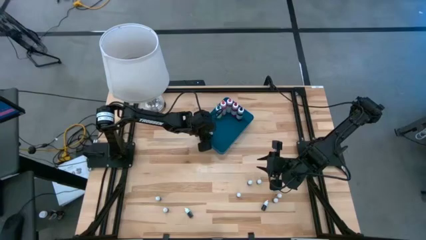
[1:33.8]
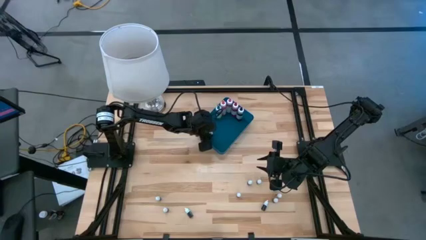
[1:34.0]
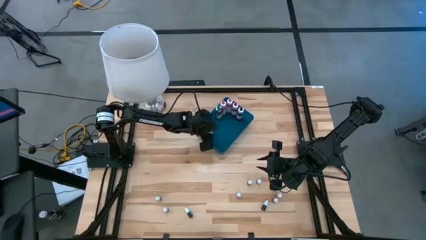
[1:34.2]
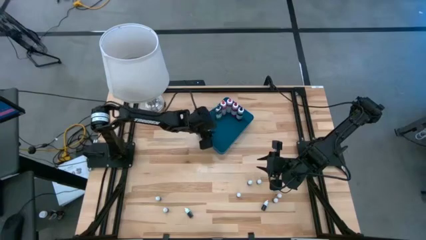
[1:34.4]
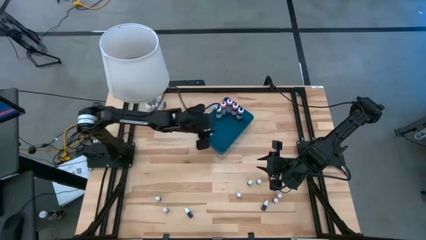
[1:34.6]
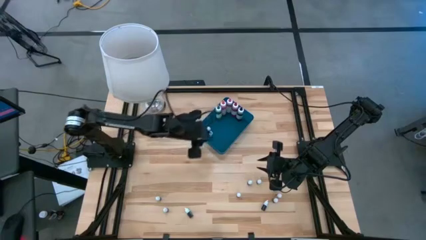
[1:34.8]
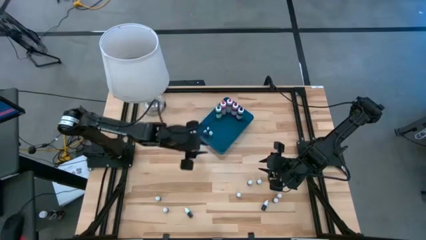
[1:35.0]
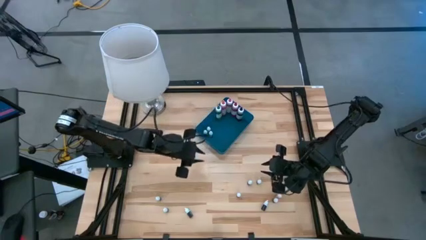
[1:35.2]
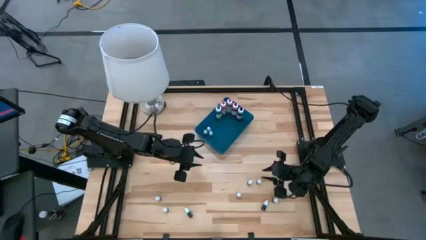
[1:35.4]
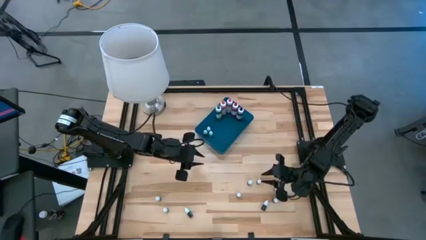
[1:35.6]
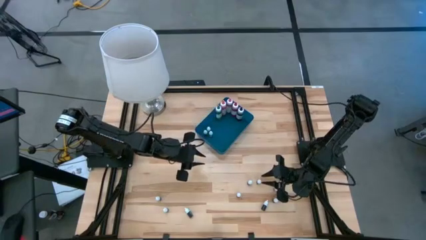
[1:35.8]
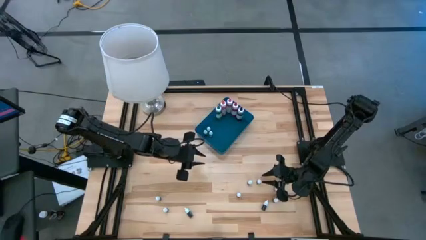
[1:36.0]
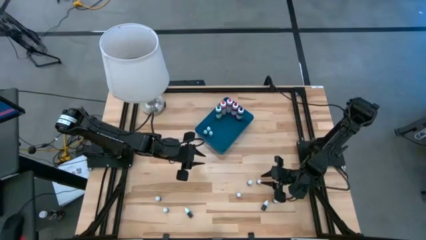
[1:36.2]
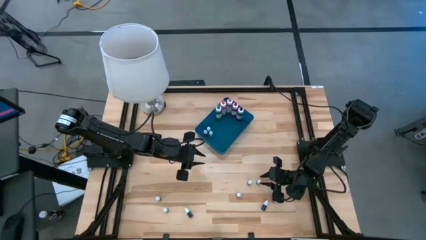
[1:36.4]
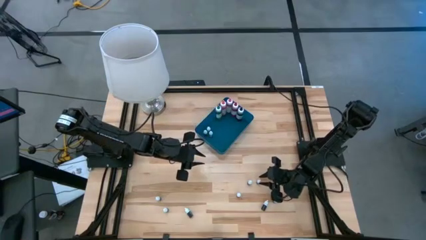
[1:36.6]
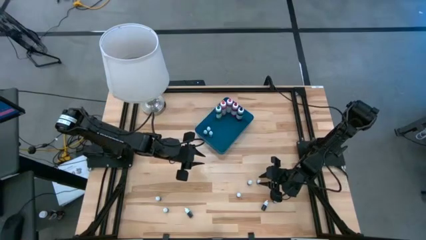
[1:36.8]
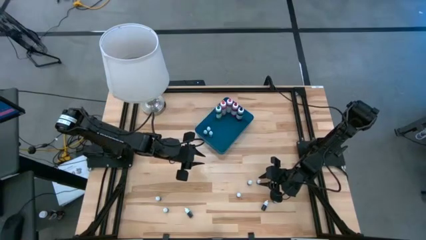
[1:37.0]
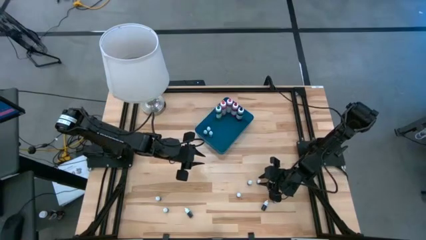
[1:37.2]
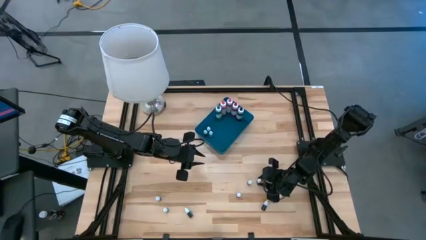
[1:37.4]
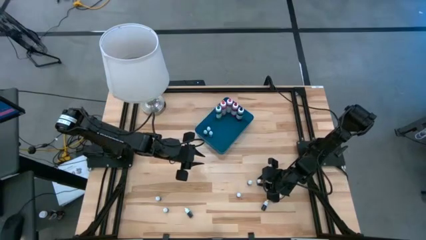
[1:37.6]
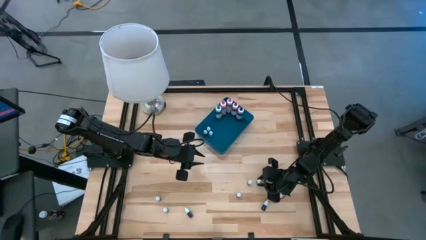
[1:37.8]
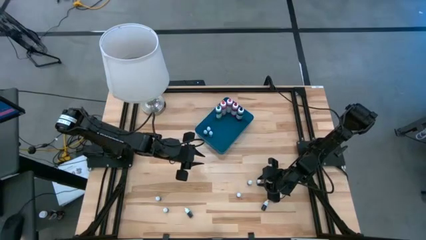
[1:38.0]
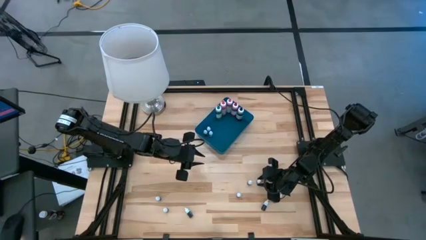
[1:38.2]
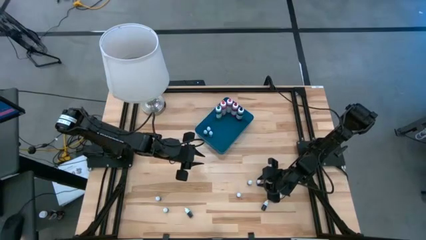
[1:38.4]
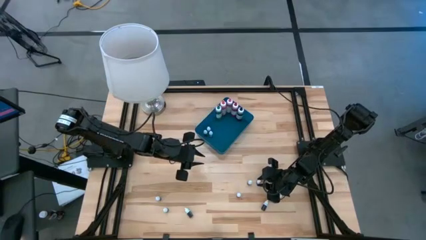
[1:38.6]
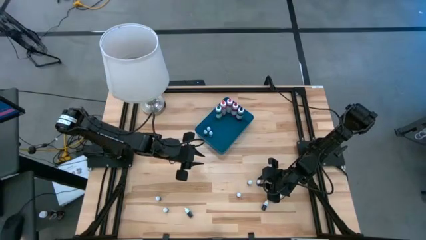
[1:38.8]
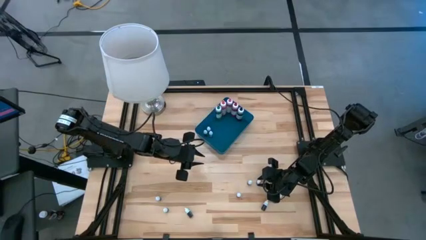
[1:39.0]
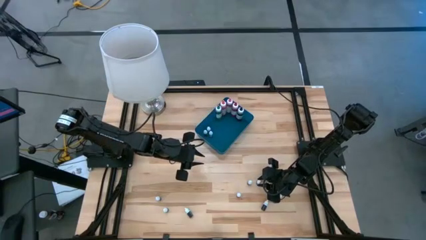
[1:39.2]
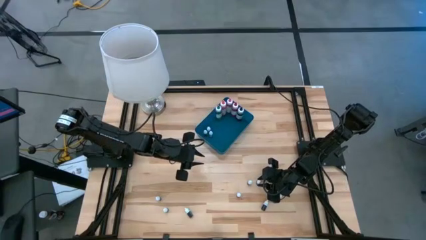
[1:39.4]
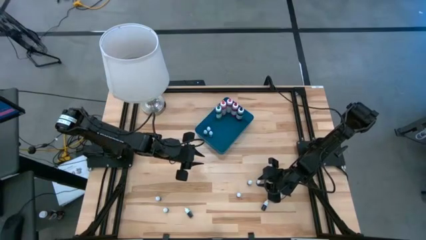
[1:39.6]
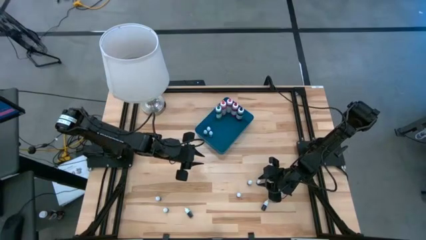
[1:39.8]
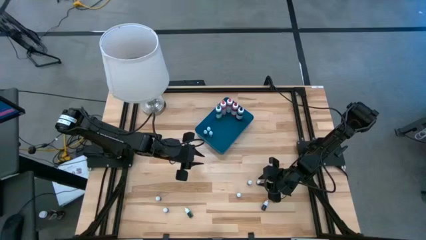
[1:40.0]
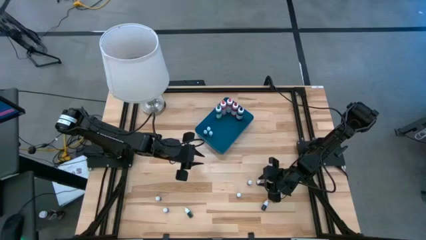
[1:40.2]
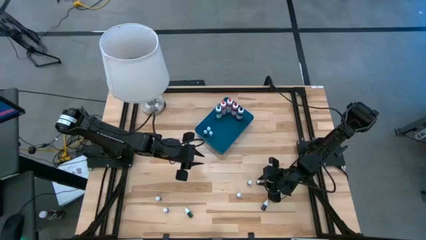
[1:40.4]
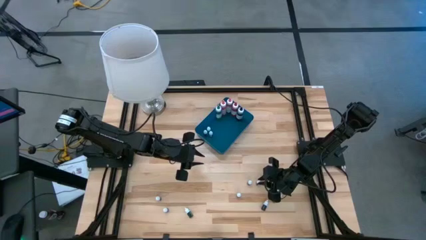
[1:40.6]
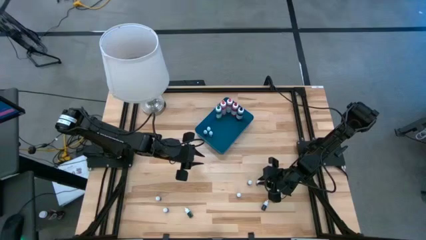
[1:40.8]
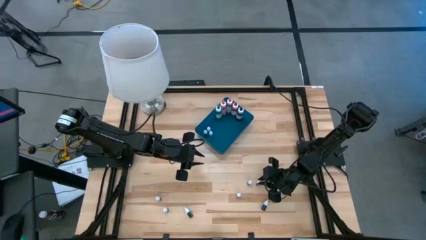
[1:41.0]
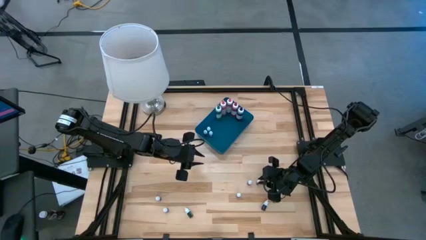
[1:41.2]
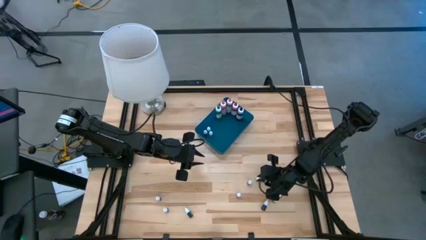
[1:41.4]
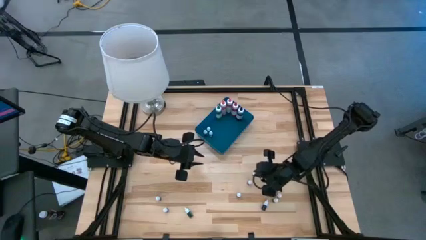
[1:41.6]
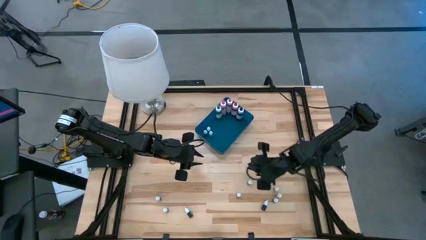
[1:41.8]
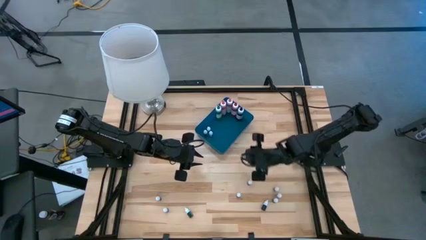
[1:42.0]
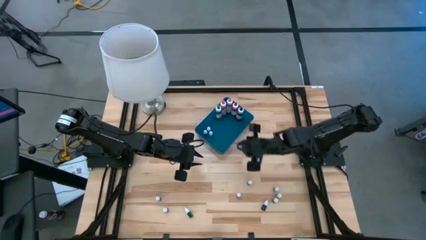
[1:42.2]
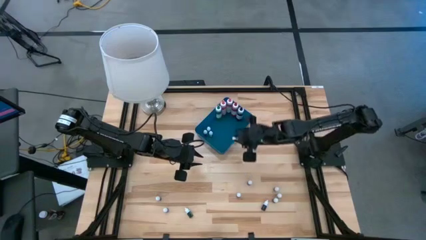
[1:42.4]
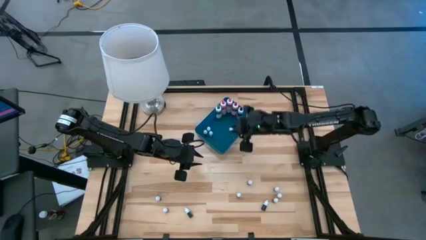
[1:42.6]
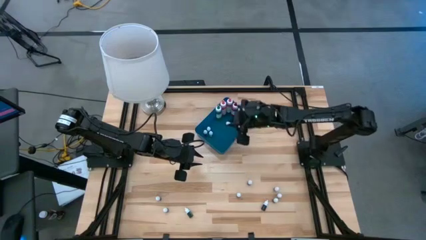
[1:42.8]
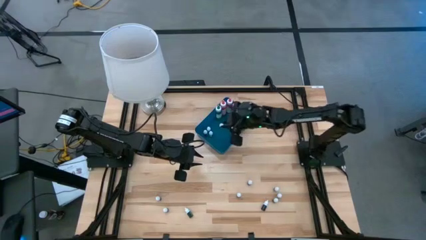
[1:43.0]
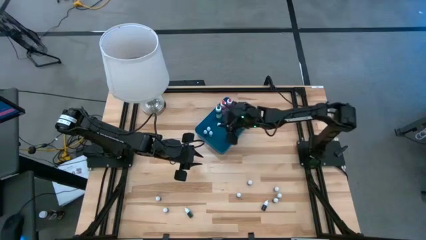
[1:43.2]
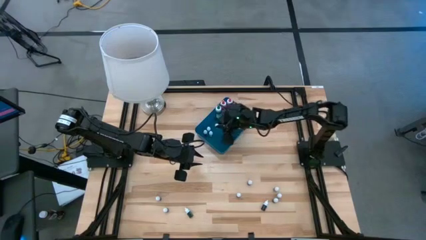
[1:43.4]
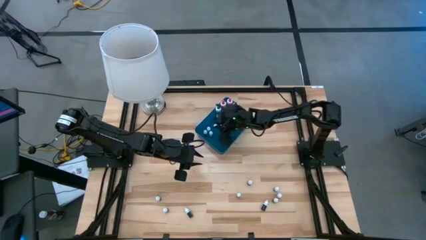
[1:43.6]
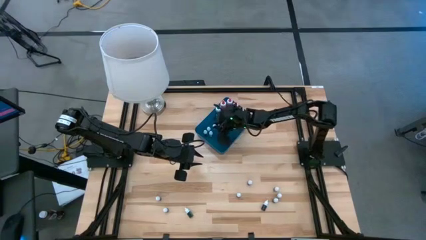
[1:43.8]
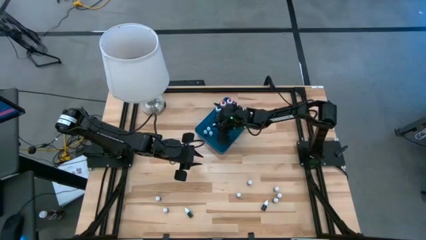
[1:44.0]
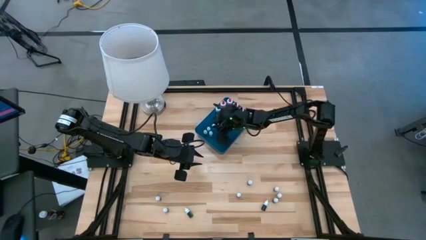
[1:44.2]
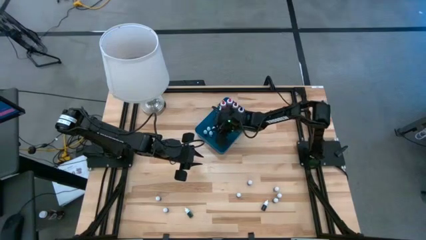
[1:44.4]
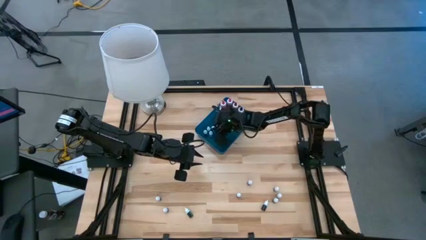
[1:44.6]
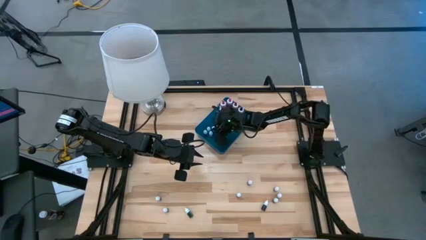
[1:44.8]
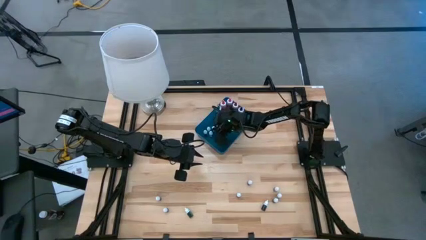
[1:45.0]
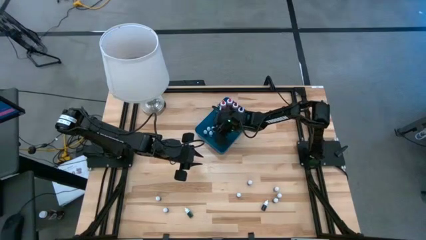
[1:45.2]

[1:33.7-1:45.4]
Task: Pick & Place food coloring
Put the small black food coloring bottle into the blue container

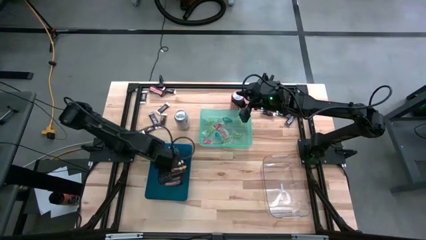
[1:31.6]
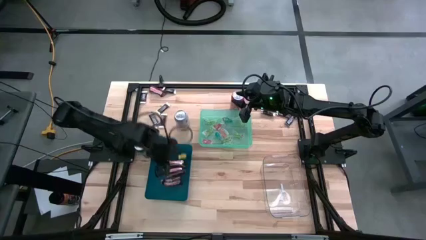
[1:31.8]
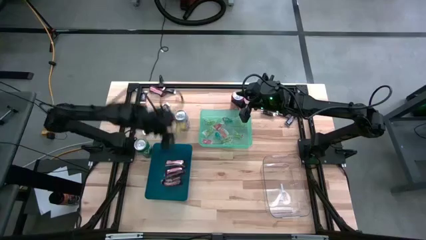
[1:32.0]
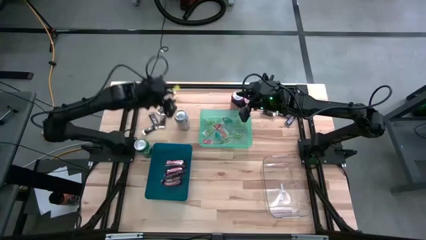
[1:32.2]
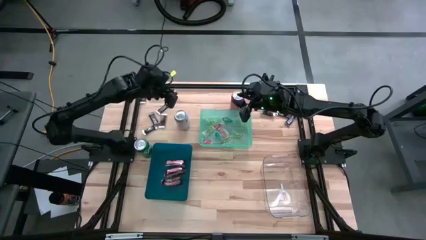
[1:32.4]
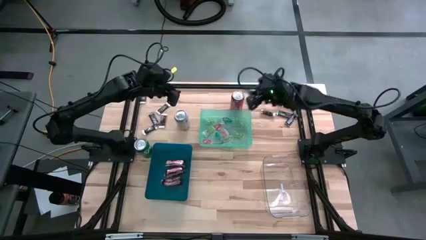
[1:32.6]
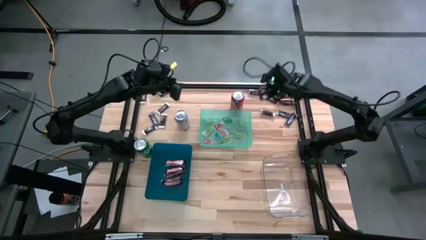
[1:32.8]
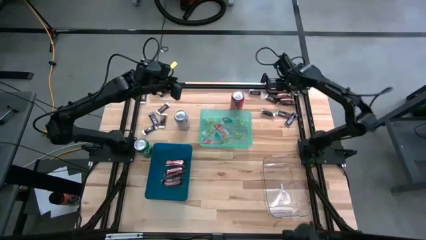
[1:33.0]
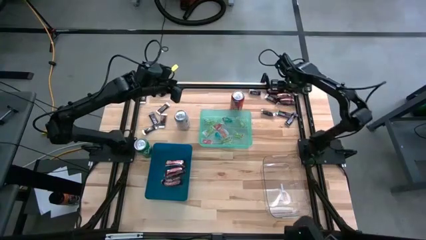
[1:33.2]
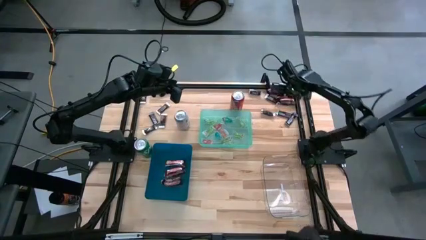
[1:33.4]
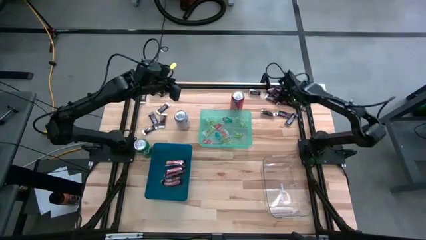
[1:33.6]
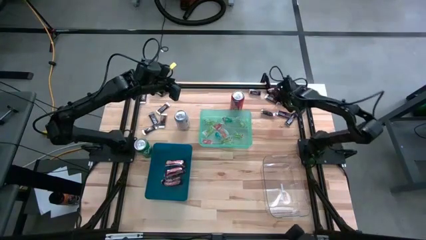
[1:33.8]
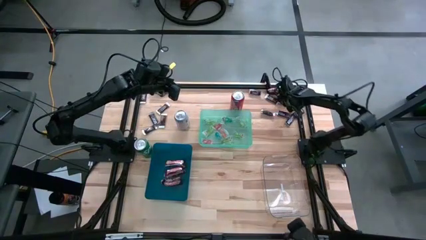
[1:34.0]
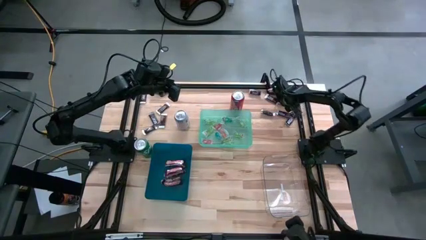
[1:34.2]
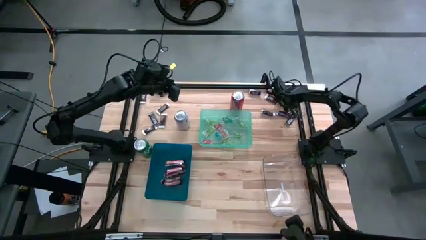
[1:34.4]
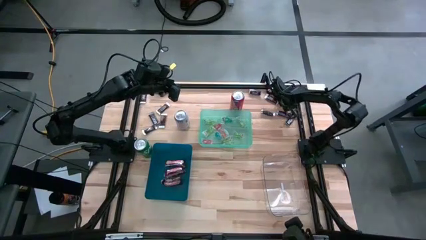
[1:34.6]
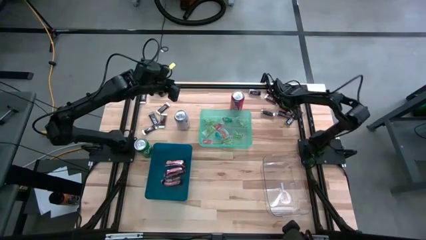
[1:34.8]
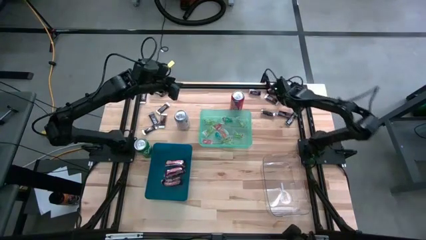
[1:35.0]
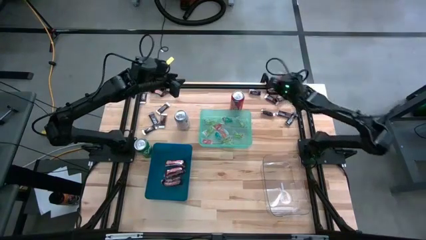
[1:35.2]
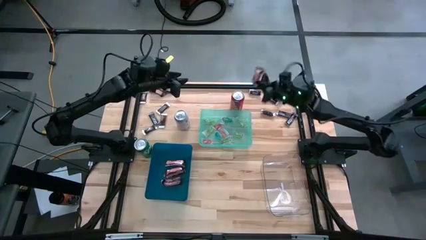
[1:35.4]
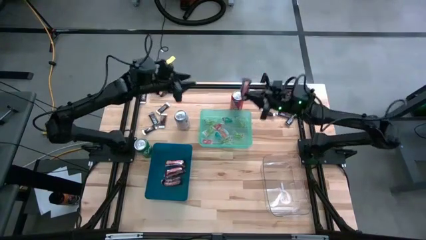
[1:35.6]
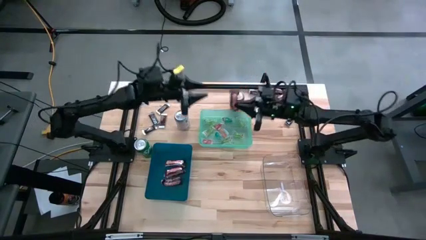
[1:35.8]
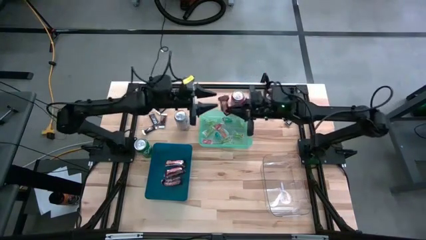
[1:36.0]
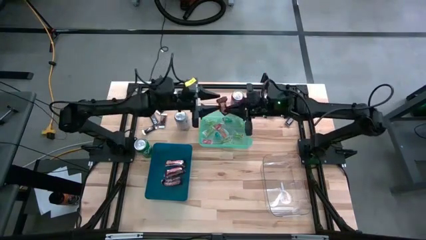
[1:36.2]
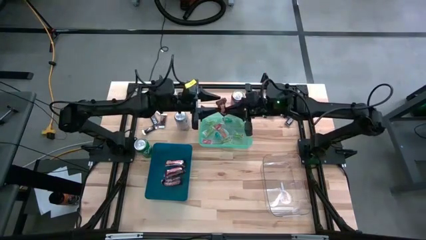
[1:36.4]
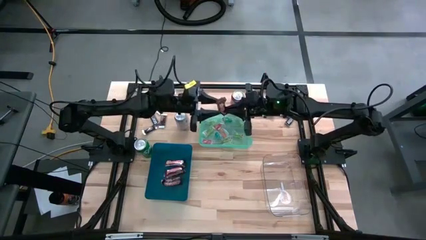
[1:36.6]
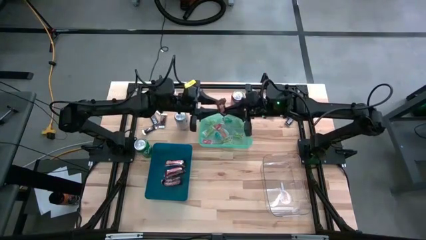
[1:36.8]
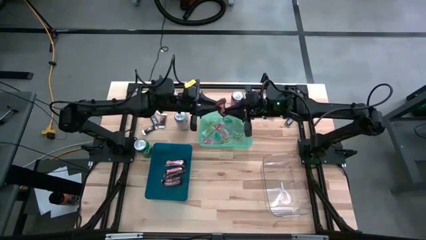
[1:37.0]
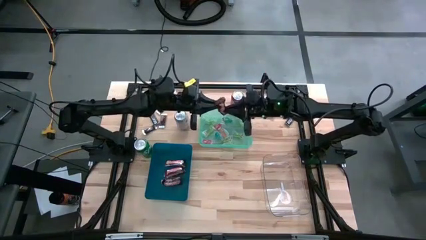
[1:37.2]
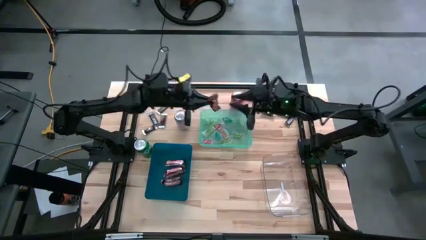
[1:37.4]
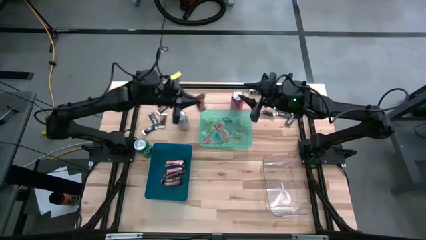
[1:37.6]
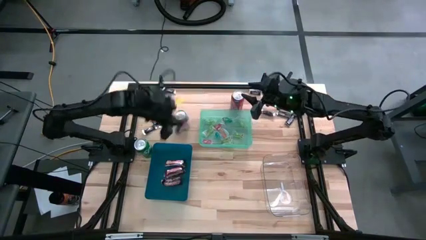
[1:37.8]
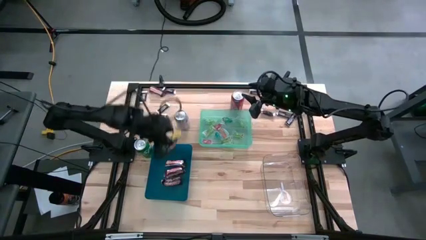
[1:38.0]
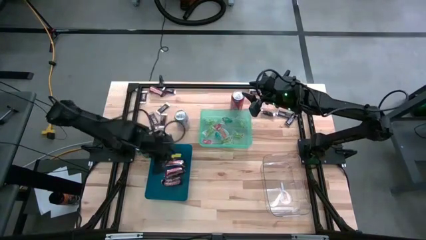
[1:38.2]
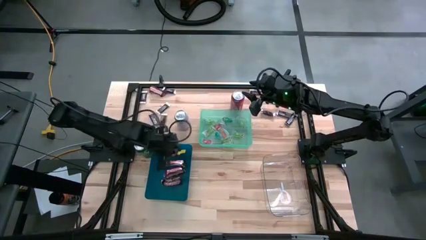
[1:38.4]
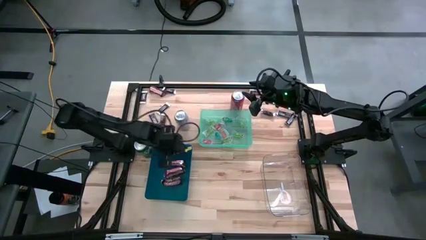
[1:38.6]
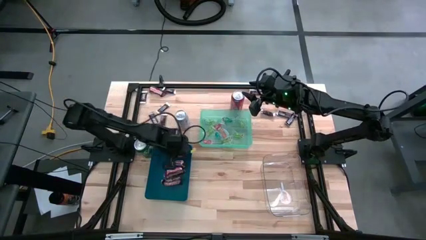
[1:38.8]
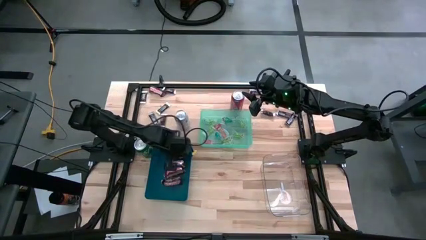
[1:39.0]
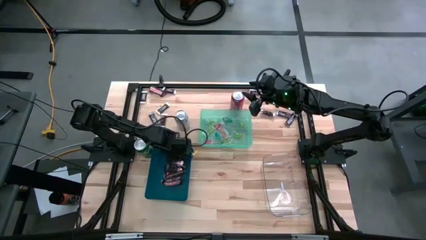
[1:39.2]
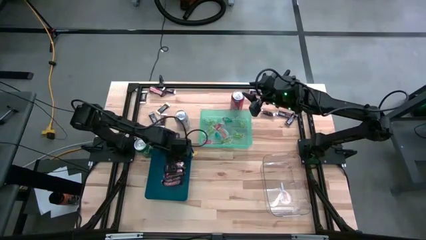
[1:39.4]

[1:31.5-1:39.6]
Task: Organize candy in baskets
Put the brown red chocolate into the blue bin
